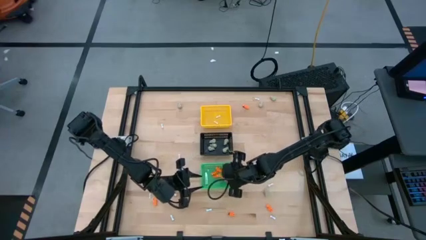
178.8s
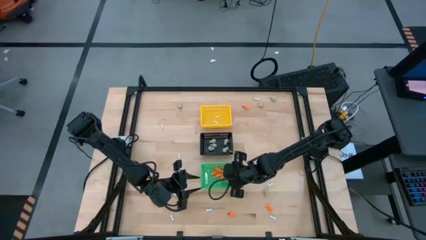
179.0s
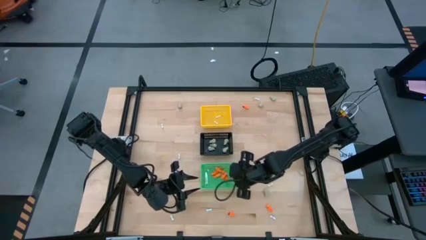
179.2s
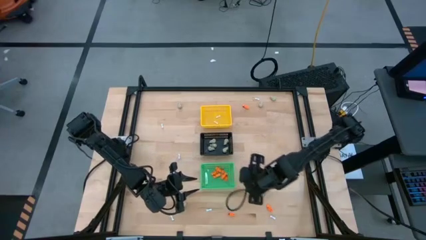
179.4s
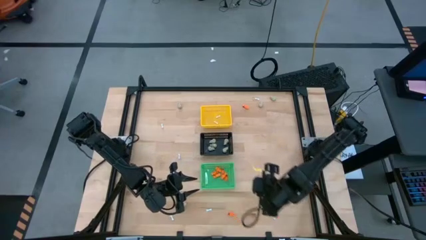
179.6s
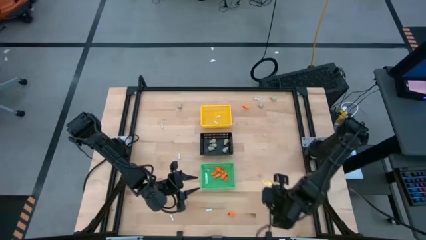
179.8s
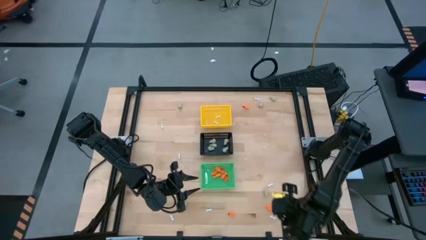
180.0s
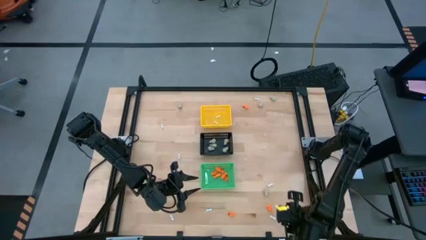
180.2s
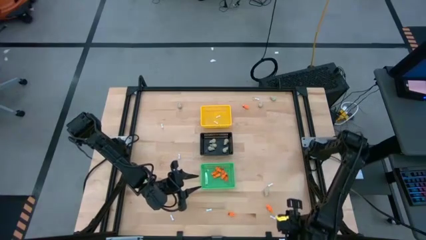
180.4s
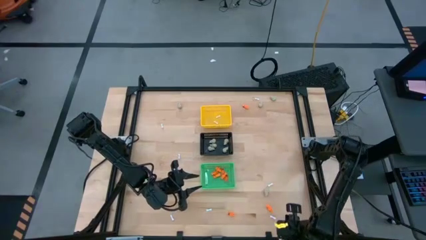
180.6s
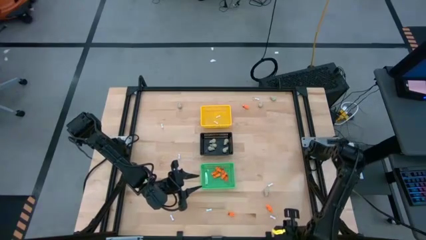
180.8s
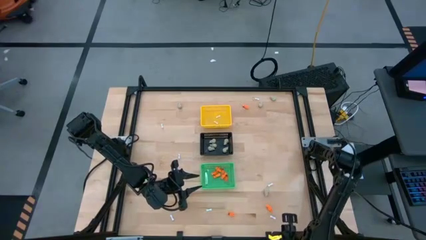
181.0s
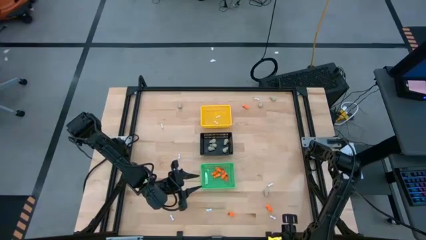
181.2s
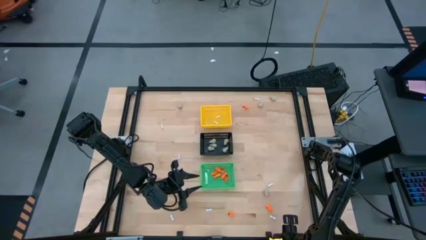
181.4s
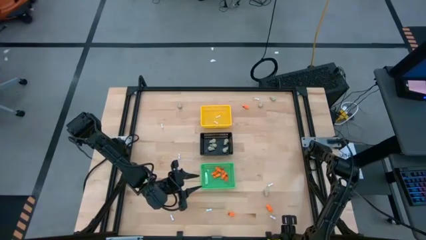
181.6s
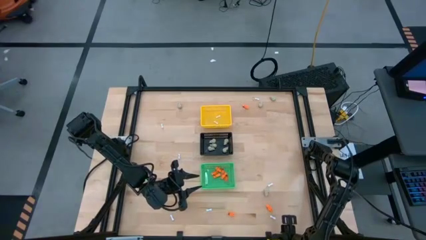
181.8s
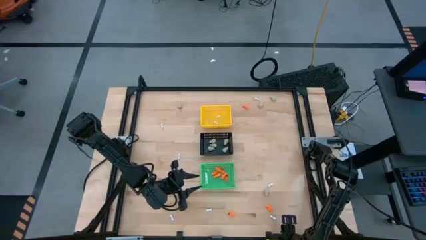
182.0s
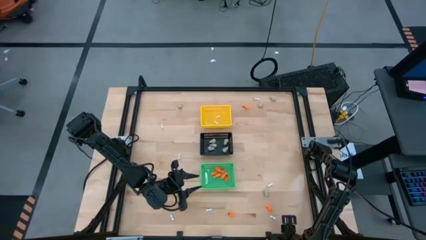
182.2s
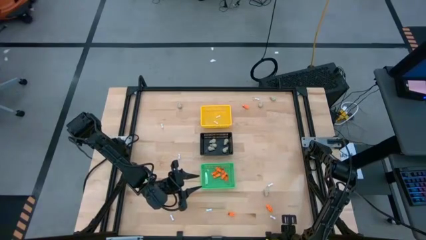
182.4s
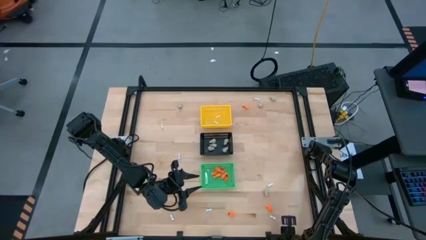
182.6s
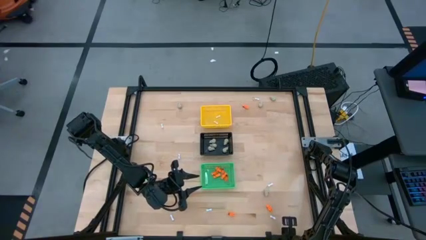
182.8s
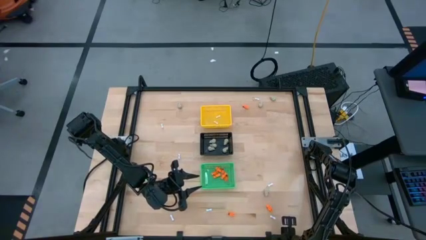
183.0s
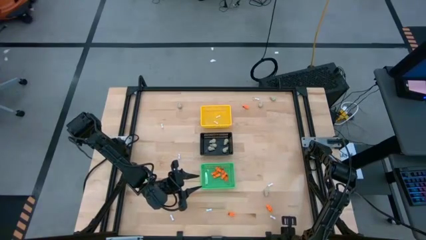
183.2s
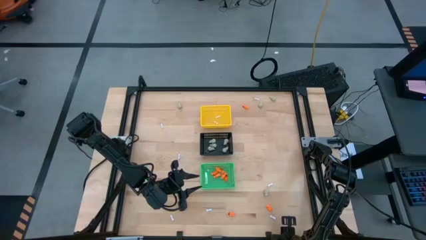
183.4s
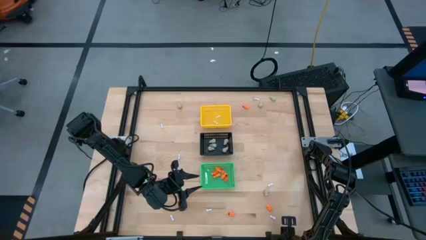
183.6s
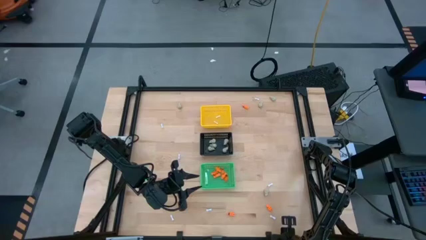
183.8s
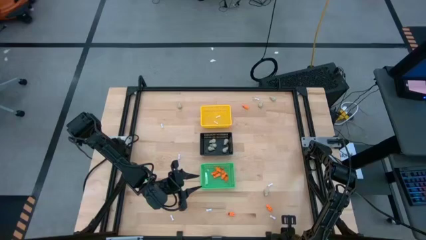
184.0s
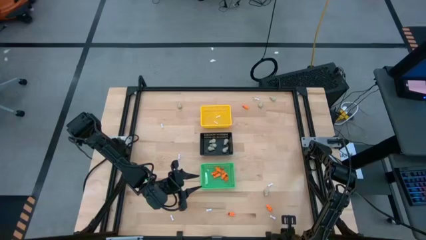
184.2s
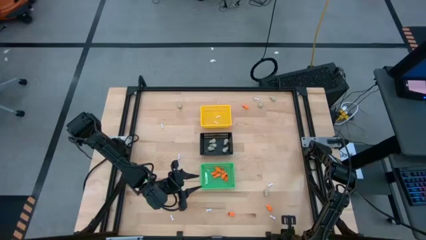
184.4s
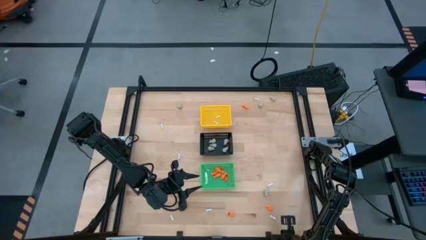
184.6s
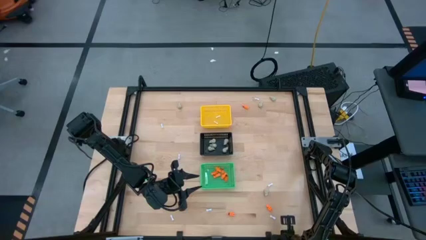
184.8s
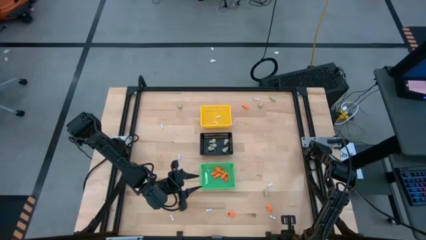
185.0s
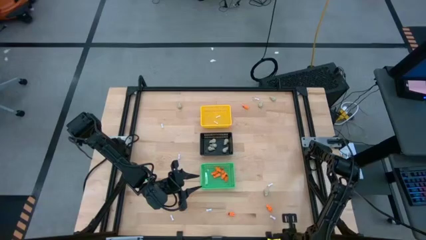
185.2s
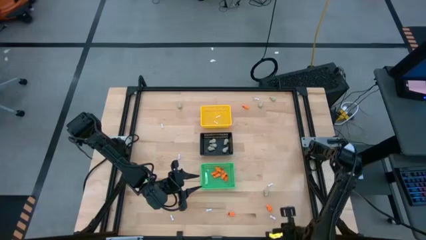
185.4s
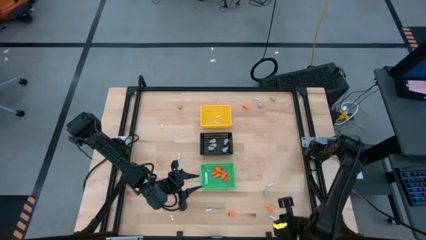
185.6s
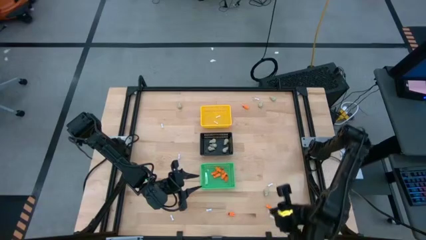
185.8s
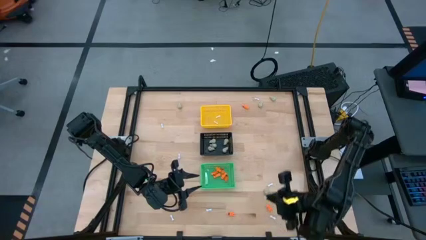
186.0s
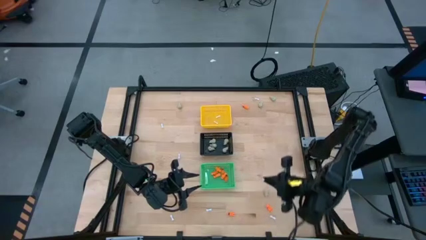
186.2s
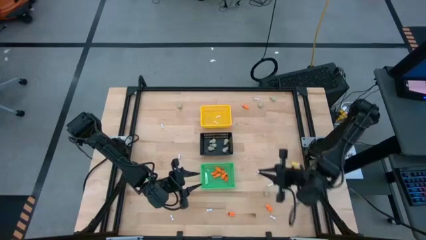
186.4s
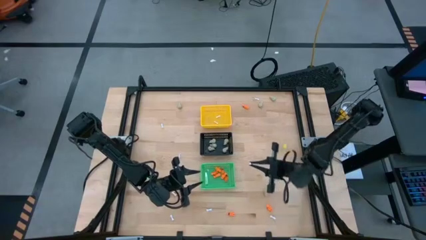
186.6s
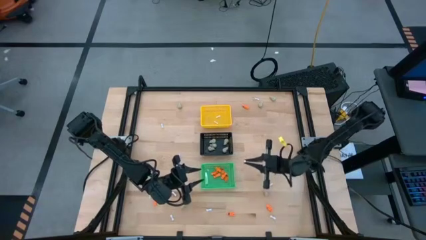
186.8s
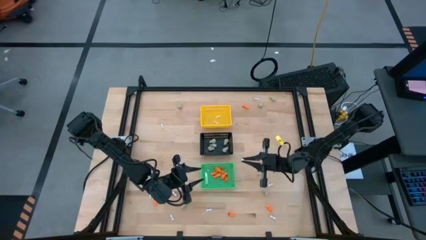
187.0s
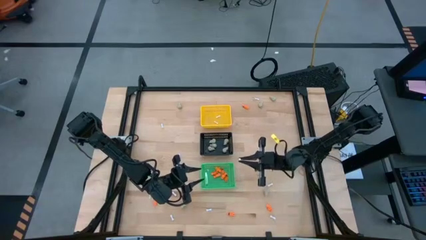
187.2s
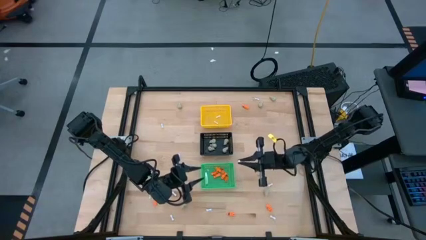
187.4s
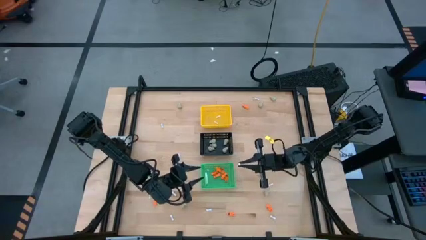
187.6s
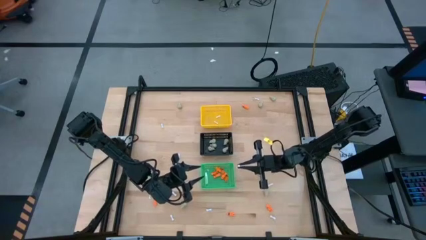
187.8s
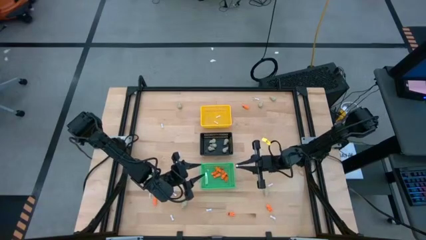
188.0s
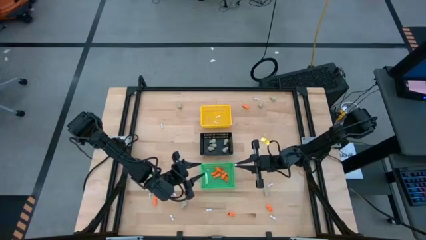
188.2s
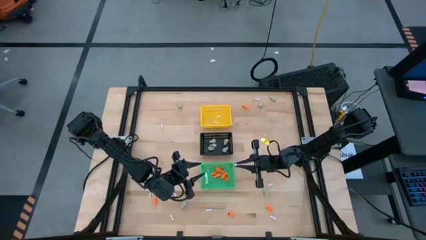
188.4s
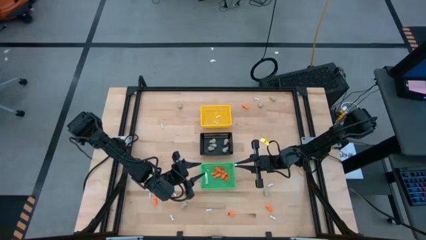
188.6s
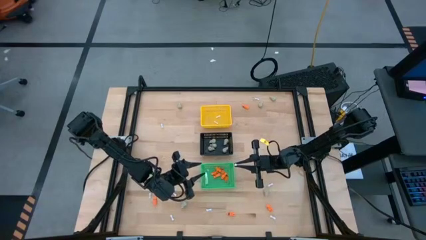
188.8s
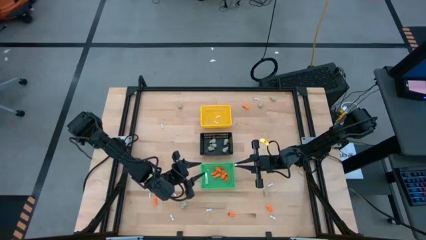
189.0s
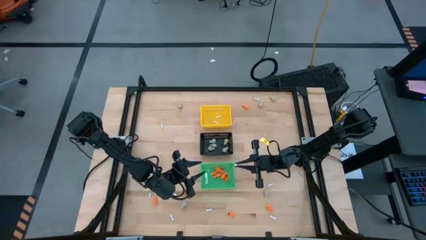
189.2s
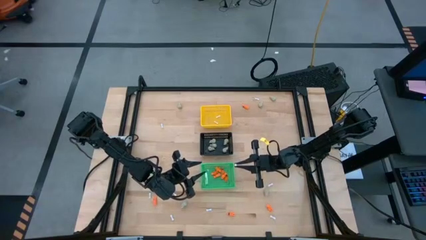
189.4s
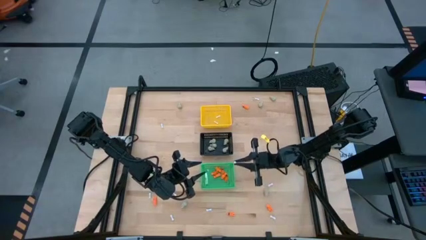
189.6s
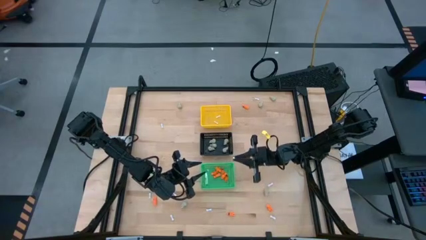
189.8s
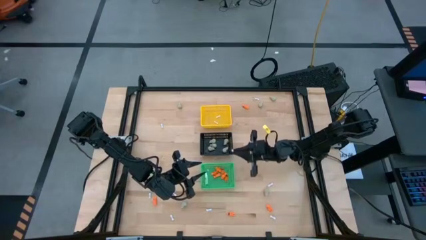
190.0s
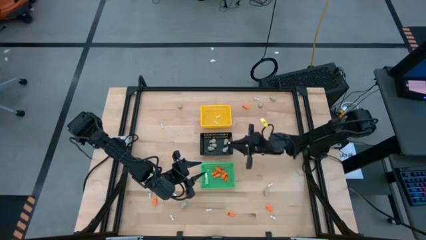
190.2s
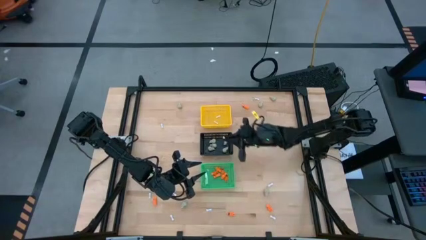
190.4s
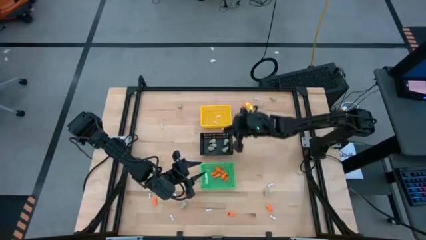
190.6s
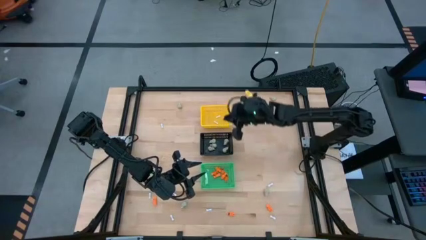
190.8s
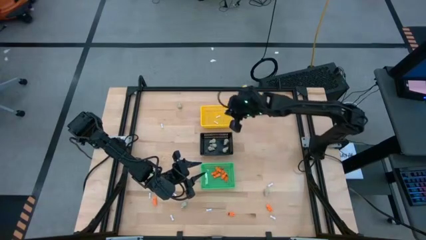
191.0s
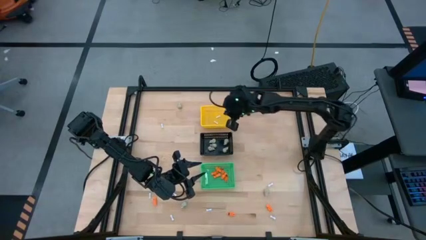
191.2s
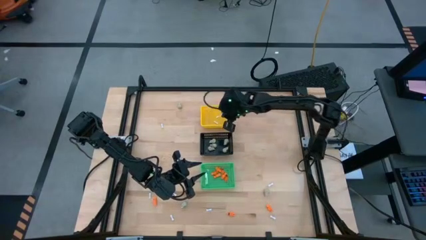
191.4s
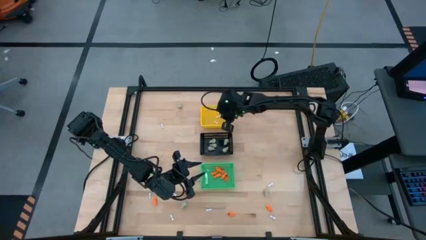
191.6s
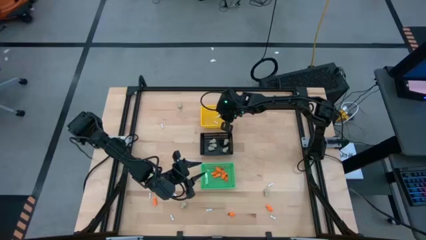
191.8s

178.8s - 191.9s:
Task: Sort Halloween decoration
Put the white bone toy into the yellow basket
